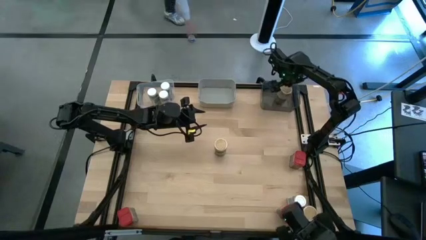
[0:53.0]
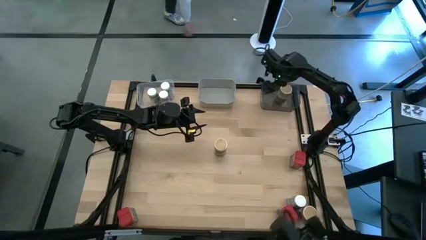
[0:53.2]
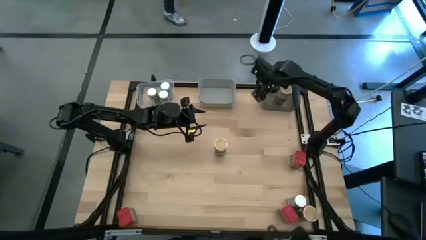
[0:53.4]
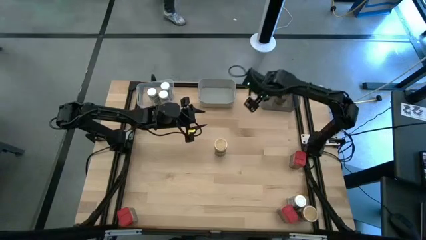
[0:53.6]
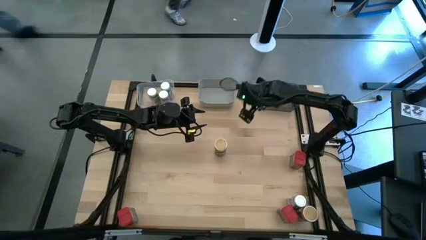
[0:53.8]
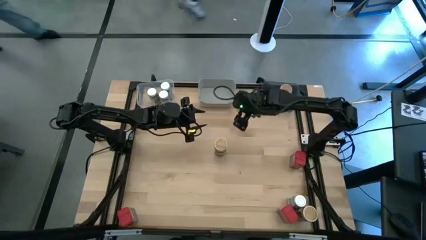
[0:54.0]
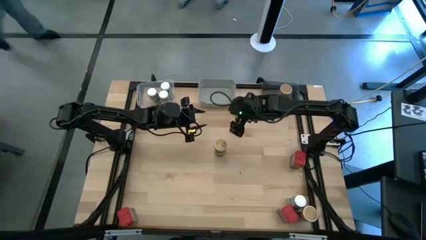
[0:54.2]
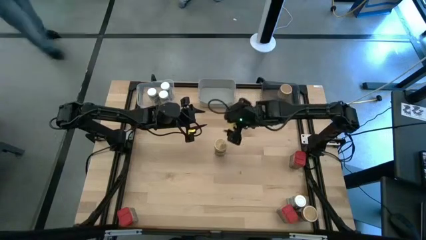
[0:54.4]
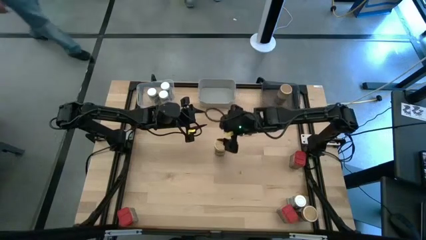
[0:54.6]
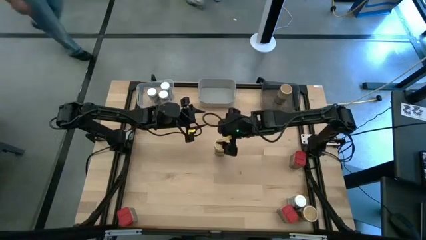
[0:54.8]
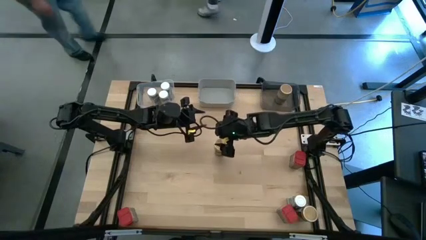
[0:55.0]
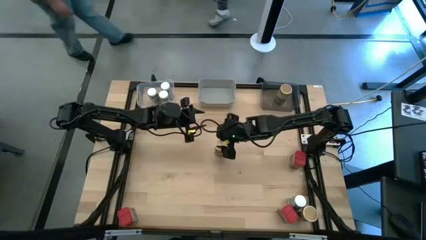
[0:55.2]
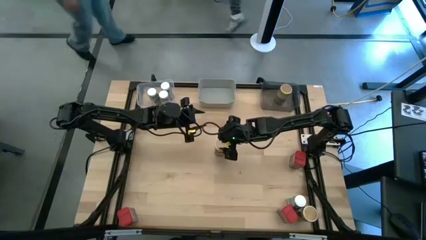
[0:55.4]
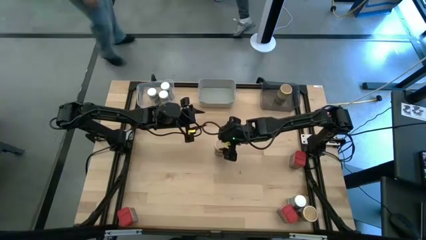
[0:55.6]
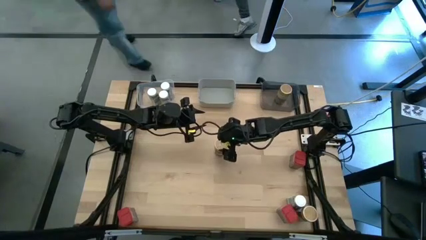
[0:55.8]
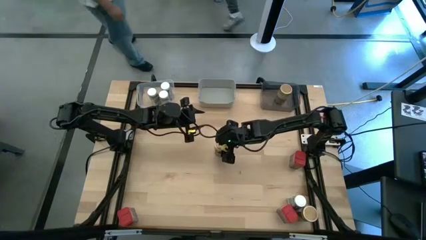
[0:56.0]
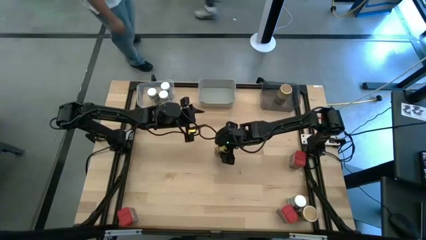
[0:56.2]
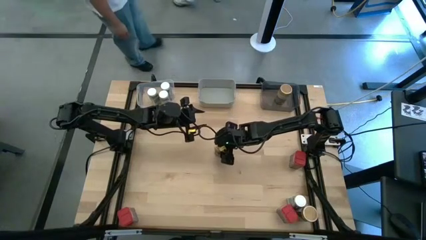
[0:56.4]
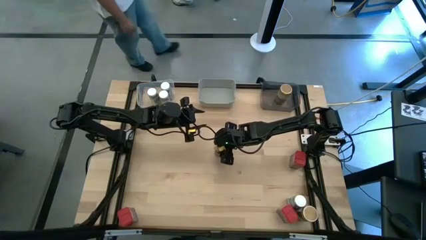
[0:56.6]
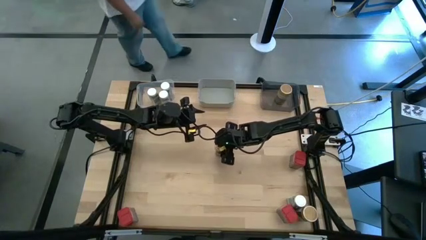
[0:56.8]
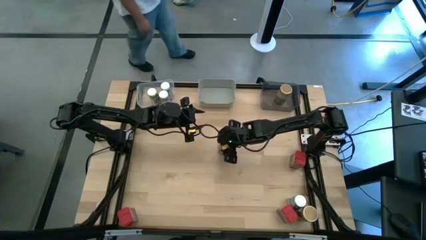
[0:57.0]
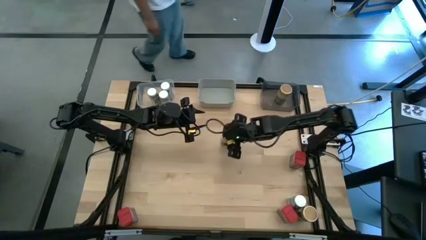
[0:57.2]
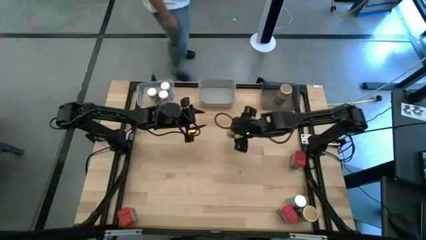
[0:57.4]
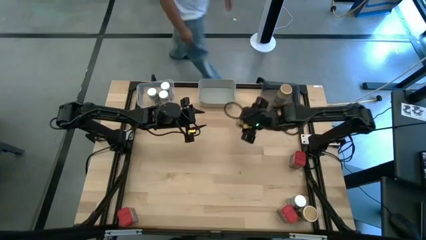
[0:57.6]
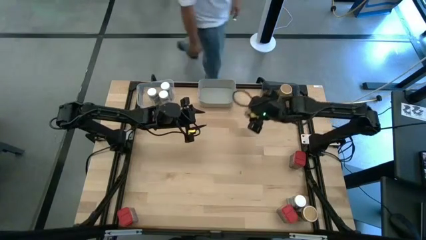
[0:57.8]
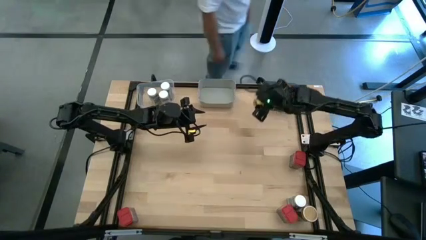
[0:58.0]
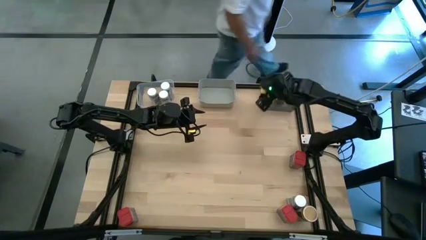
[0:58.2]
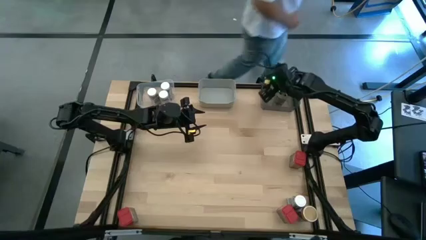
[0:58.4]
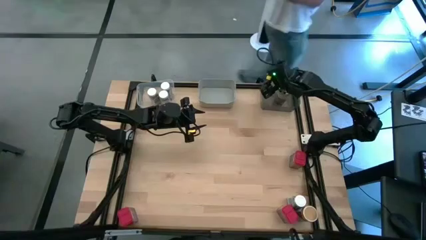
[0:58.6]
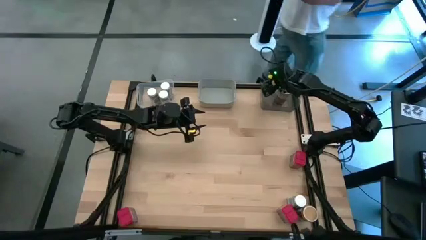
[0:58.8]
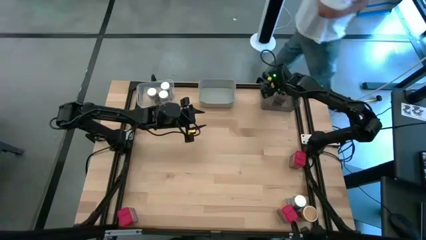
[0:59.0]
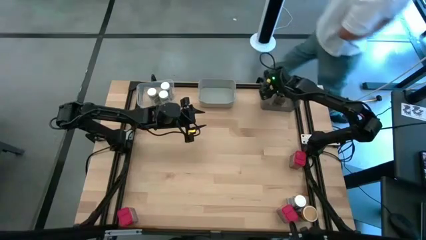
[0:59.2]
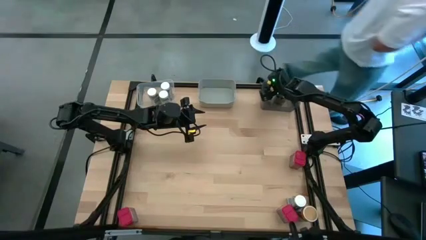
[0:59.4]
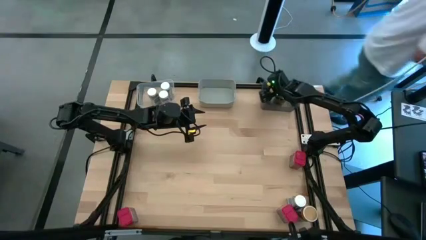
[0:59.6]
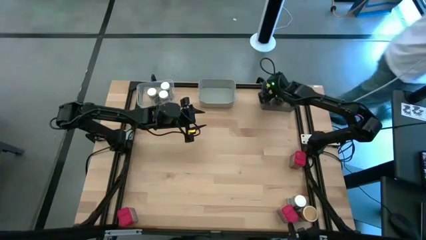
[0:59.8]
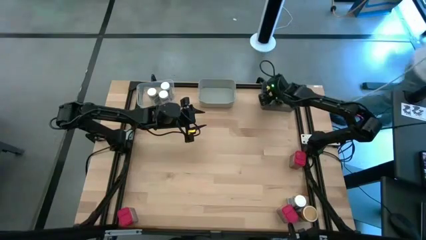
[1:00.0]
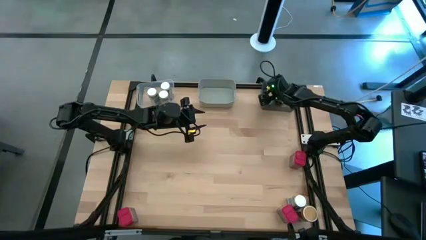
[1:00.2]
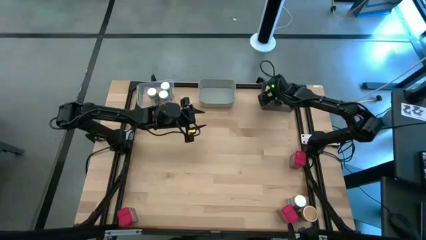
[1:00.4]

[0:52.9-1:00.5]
Task: Sort spices by type
Put the gold seasoning bottle into the black bin

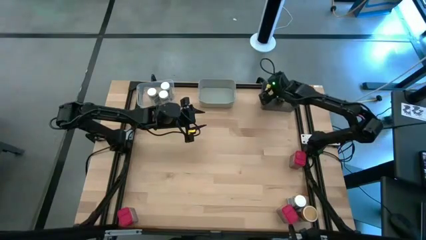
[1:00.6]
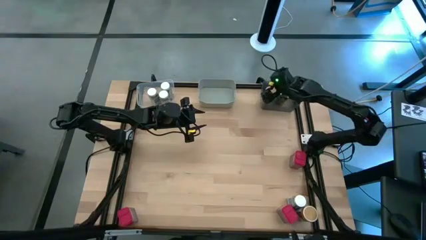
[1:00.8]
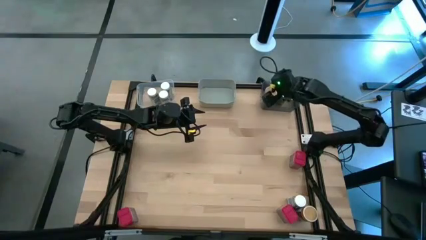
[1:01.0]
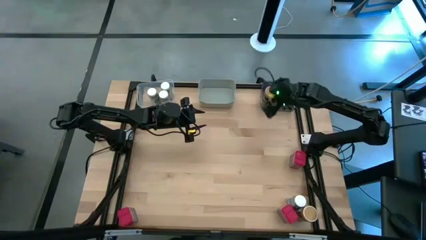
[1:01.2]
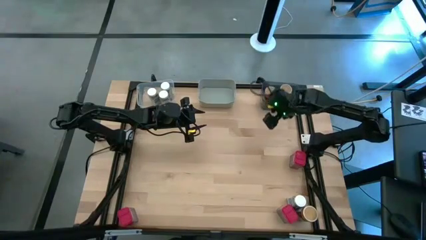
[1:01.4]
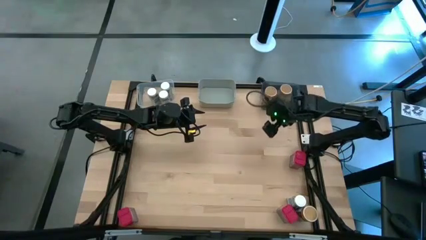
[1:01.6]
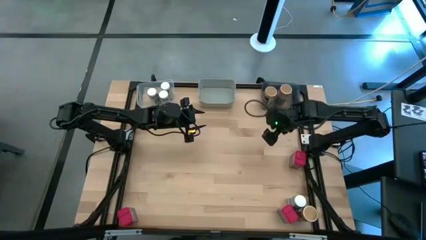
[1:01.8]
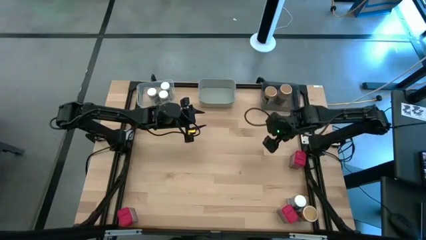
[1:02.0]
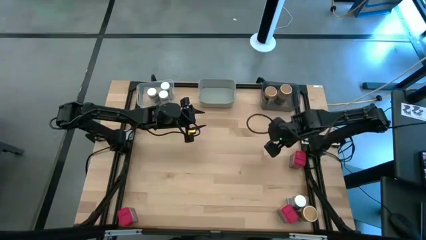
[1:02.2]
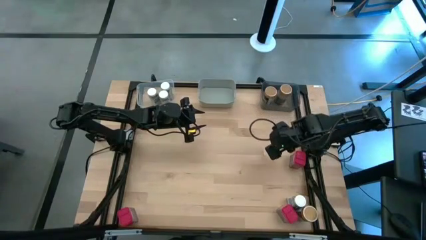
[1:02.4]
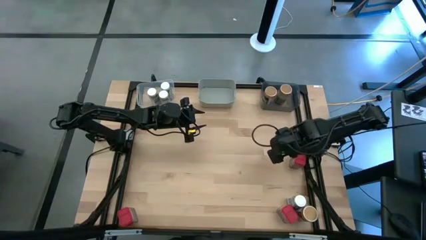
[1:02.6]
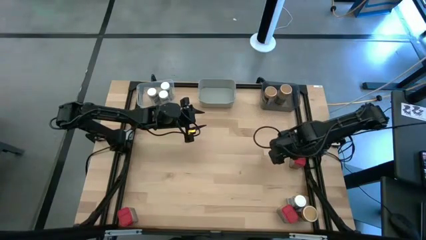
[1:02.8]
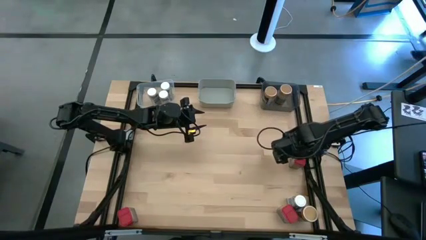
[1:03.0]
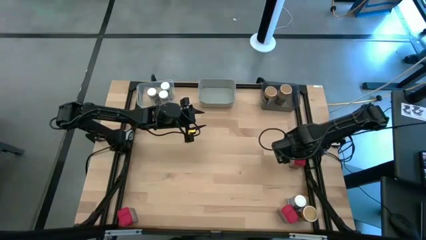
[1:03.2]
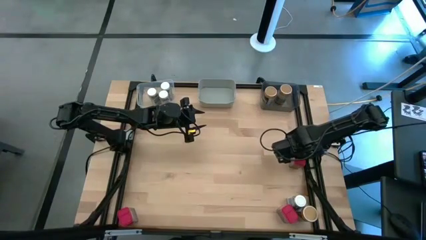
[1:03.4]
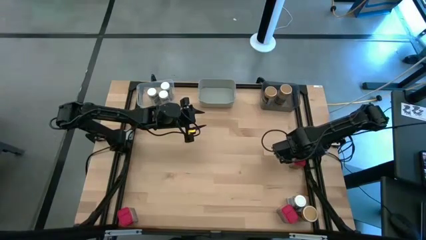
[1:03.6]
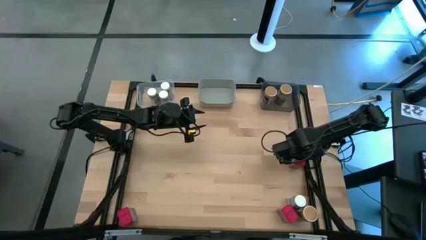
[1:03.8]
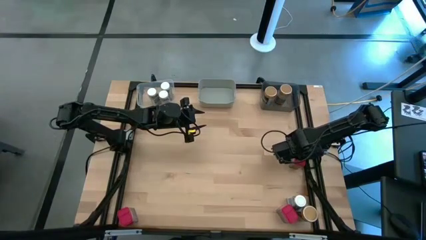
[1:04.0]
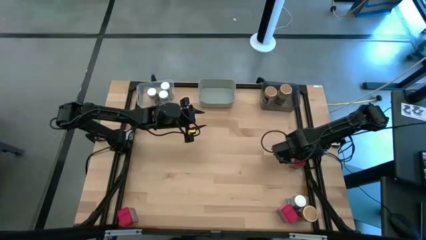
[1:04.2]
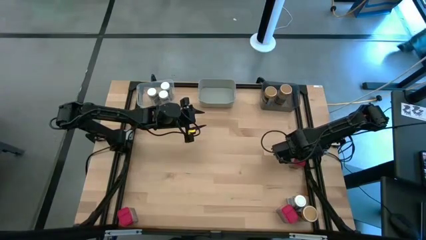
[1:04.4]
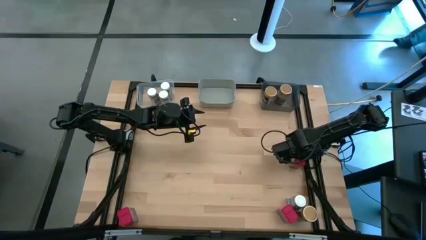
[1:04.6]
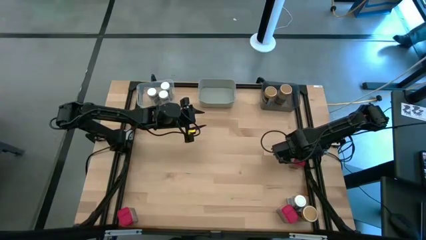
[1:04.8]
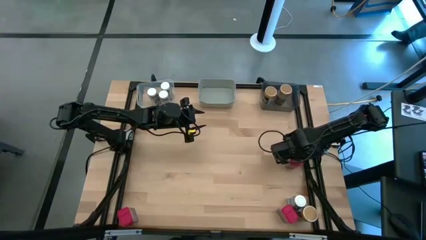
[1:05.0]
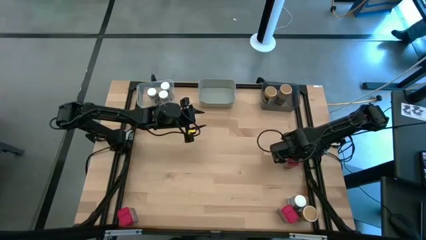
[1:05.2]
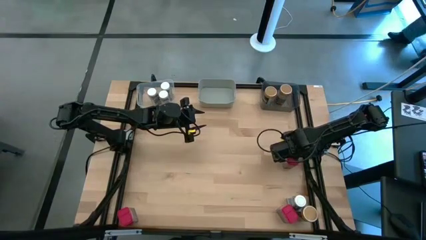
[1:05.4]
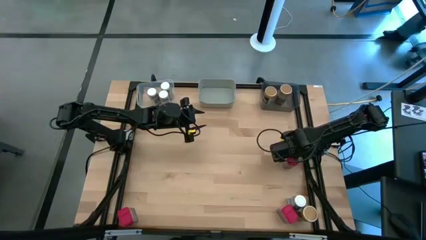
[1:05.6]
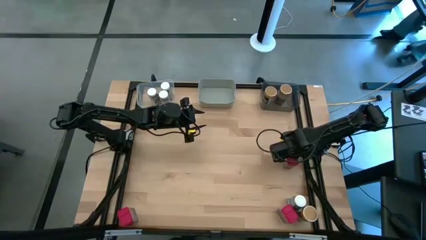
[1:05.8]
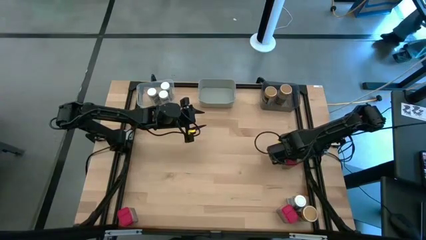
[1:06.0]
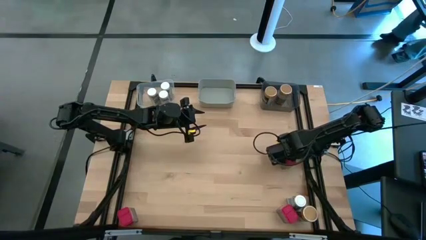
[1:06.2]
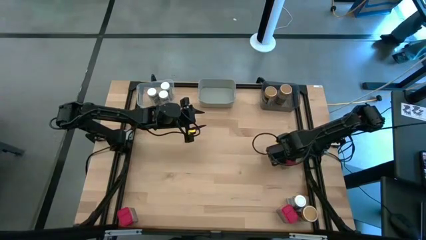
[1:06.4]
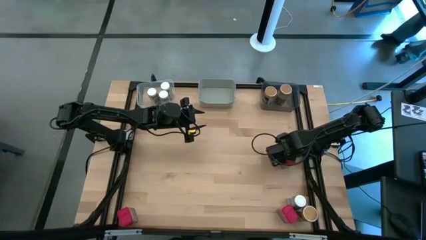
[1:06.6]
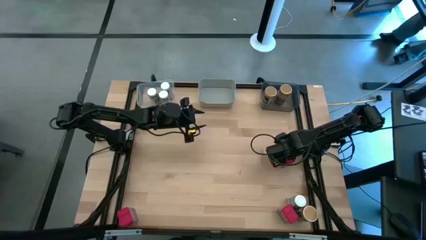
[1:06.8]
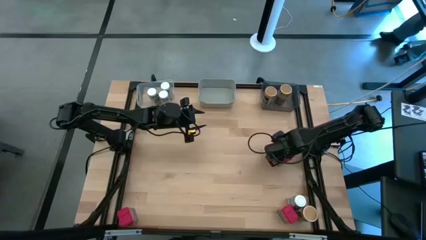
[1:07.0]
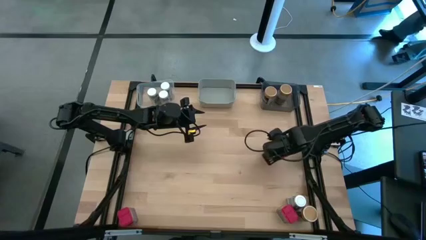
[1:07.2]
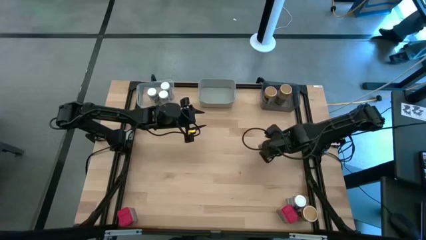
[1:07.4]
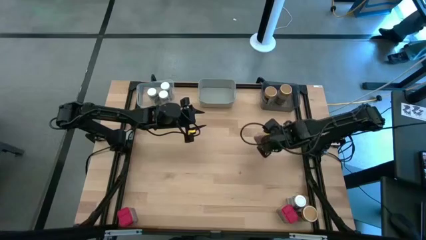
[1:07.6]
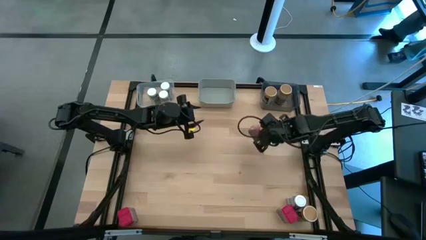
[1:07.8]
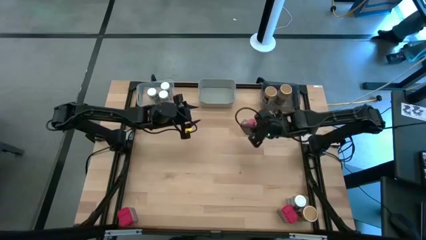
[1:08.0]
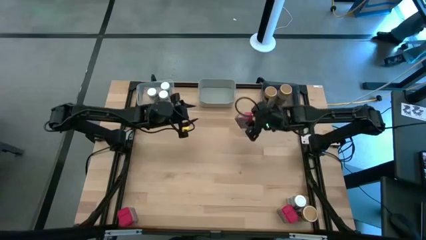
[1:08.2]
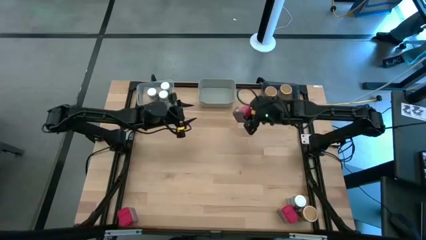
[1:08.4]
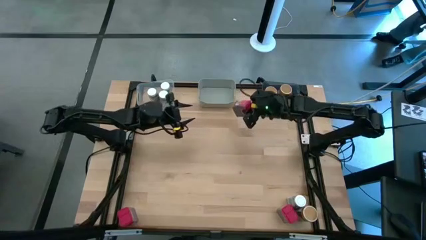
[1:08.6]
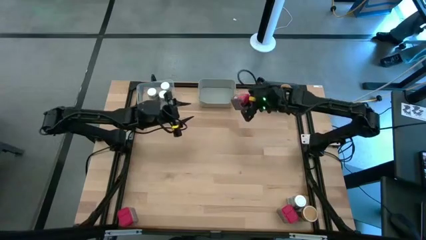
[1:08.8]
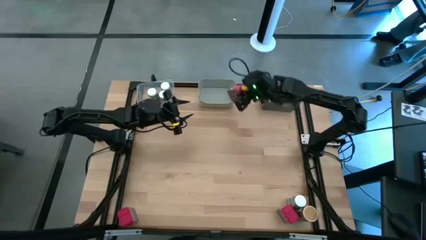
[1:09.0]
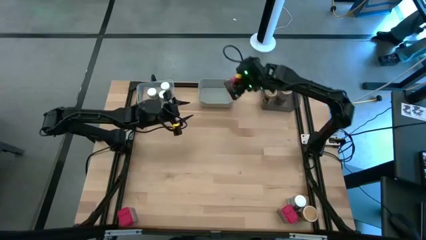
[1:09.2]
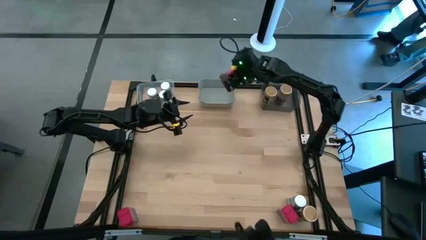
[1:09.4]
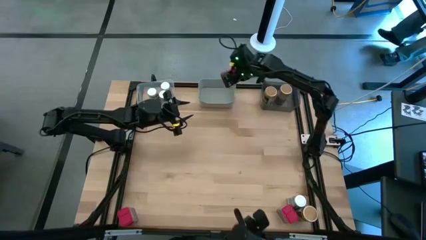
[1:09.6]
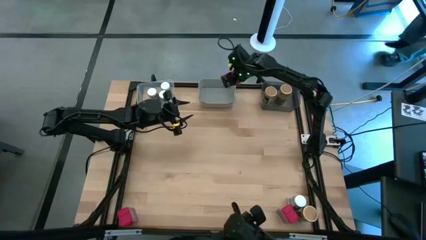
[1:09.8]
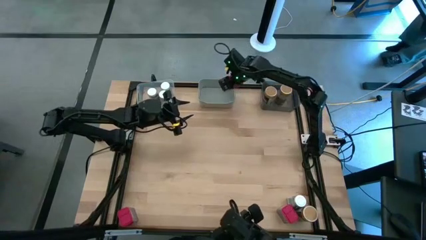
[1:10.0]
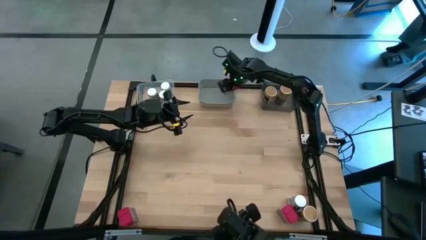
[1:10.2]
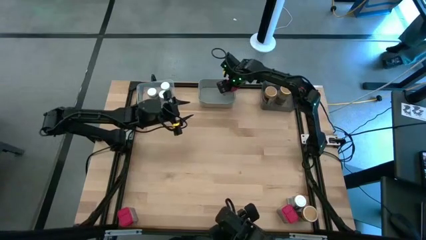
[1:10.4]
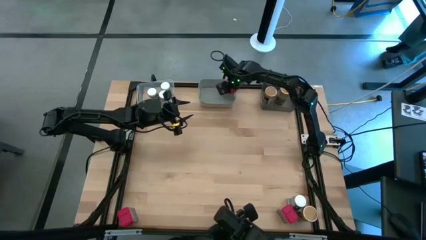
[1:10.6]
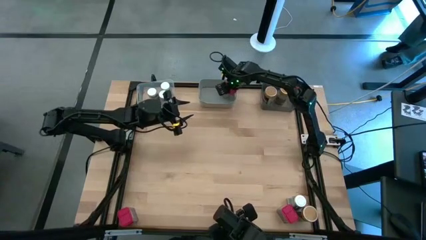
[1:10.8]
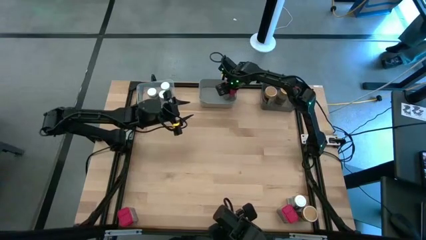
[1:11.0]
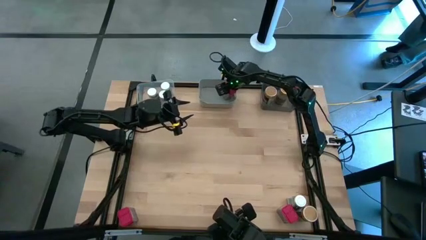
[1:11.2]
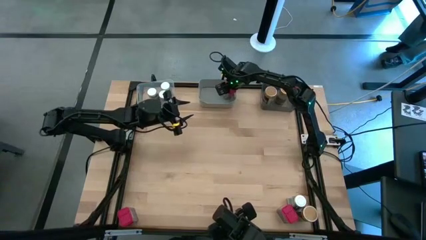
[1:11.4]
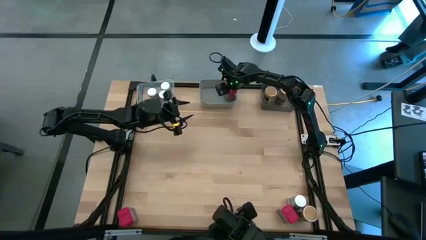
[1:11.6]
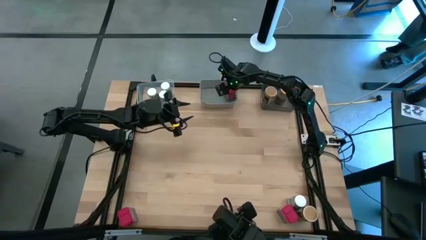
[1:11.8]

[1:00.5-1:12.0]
Put the red seasoning can into the gray bin
